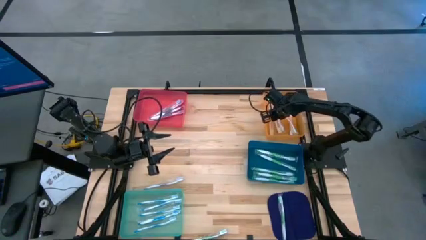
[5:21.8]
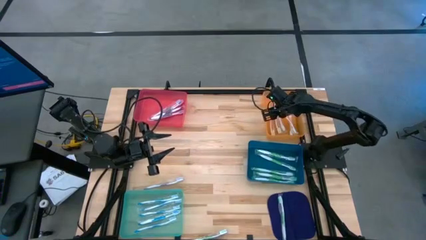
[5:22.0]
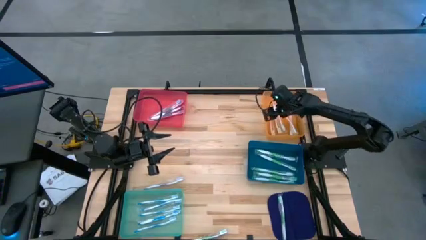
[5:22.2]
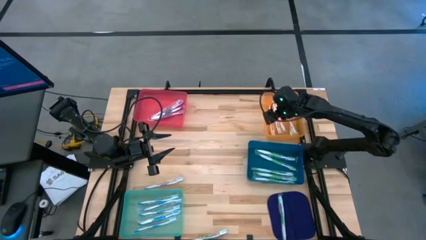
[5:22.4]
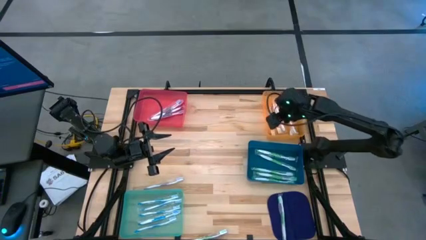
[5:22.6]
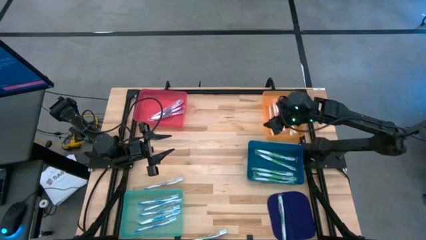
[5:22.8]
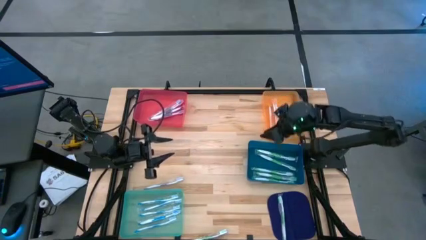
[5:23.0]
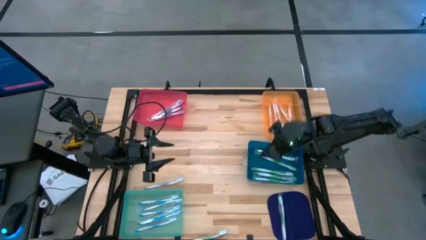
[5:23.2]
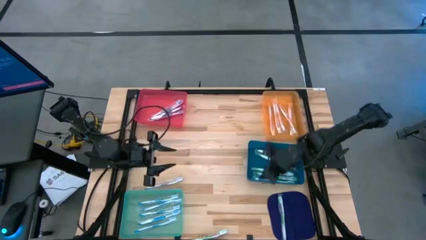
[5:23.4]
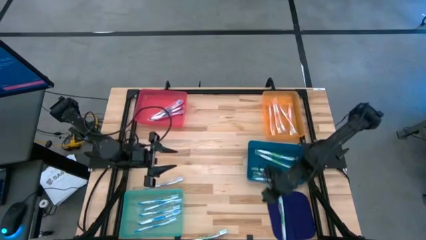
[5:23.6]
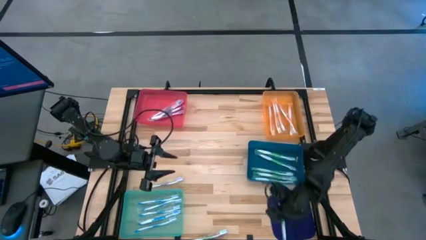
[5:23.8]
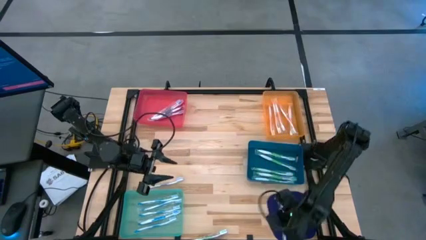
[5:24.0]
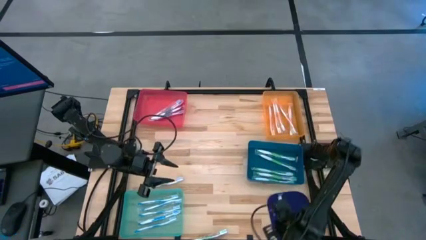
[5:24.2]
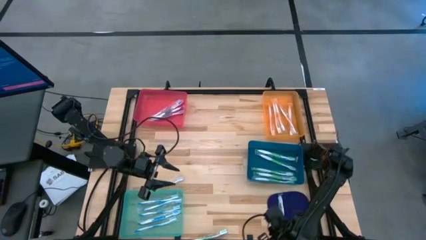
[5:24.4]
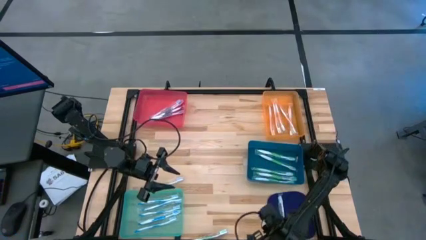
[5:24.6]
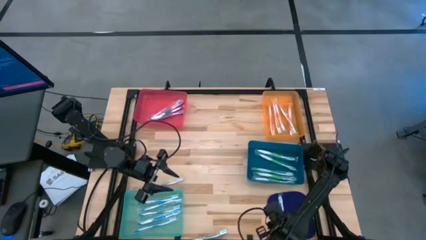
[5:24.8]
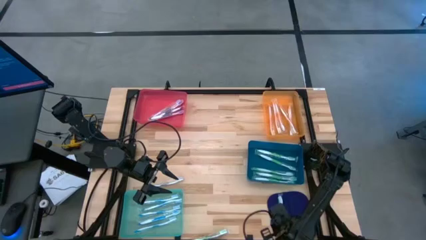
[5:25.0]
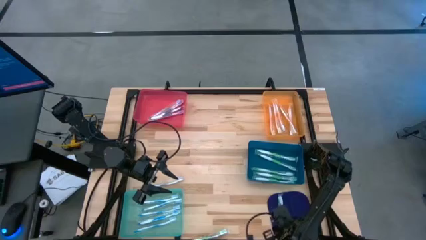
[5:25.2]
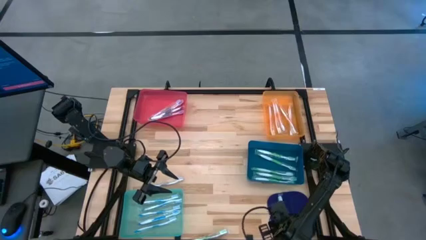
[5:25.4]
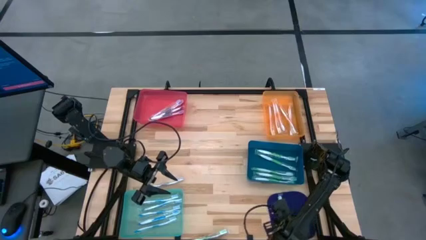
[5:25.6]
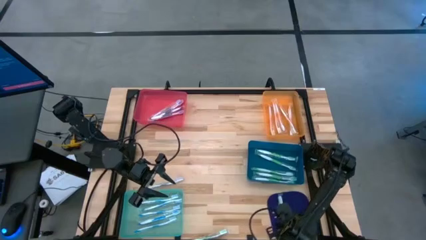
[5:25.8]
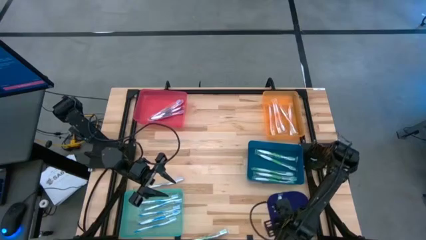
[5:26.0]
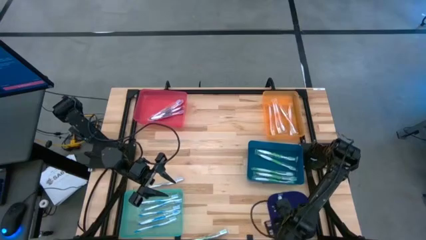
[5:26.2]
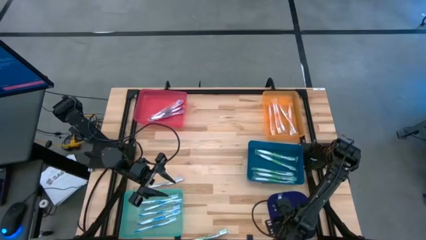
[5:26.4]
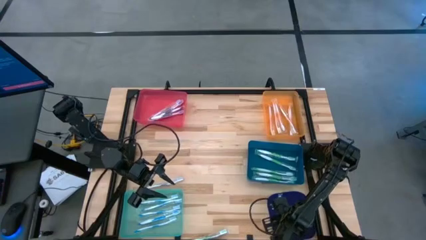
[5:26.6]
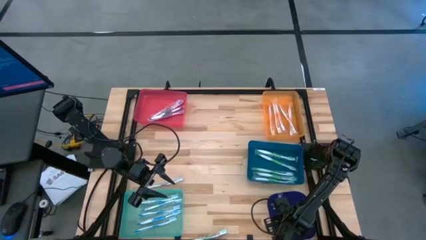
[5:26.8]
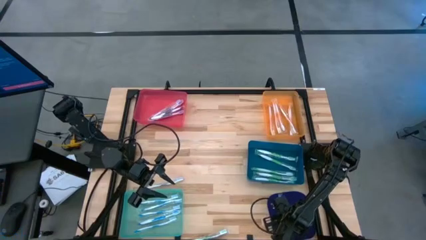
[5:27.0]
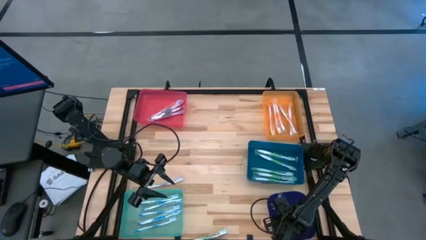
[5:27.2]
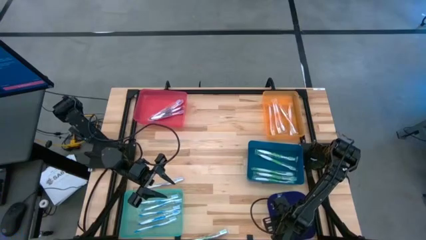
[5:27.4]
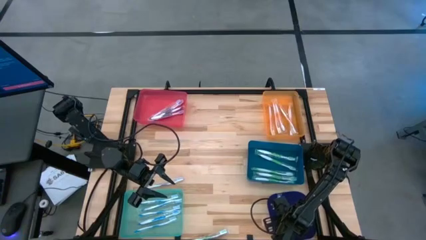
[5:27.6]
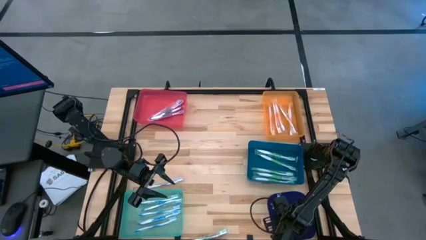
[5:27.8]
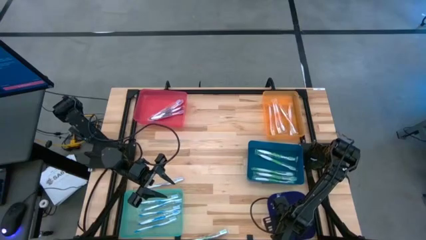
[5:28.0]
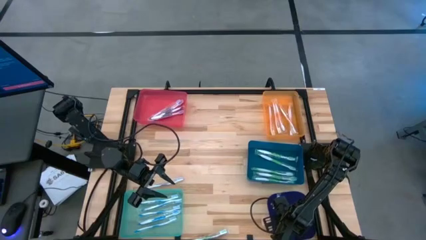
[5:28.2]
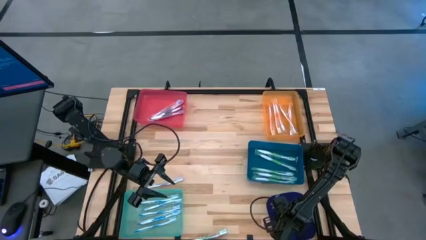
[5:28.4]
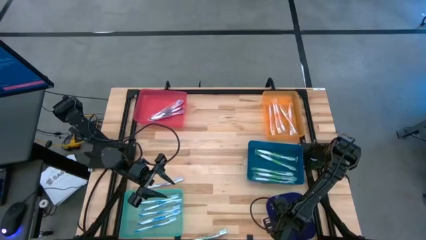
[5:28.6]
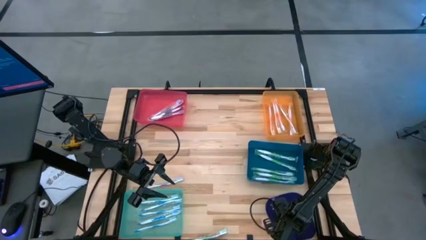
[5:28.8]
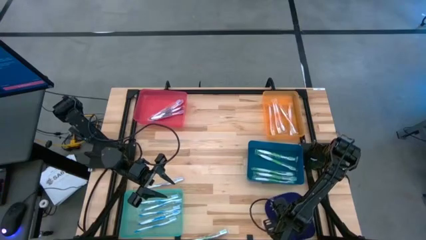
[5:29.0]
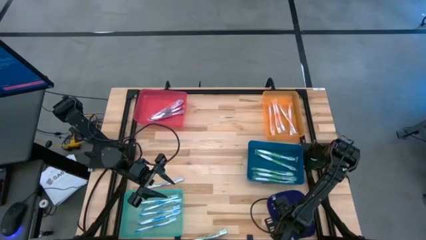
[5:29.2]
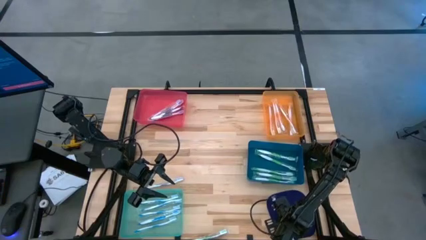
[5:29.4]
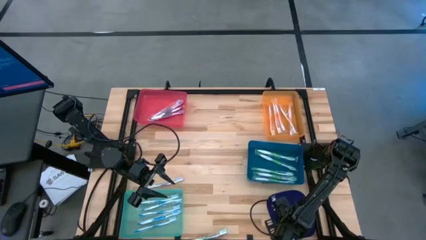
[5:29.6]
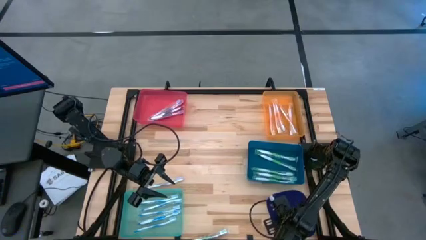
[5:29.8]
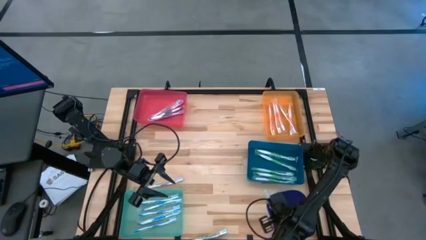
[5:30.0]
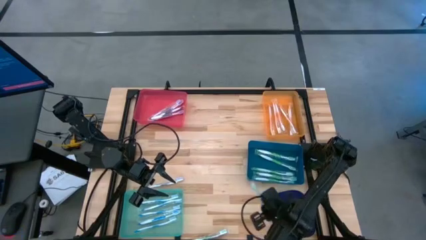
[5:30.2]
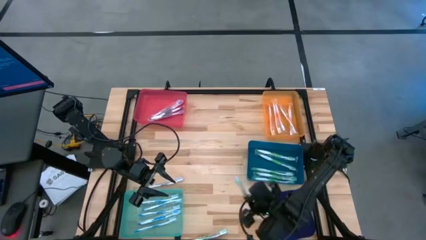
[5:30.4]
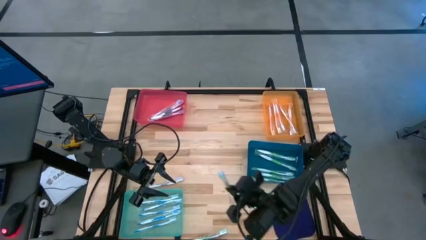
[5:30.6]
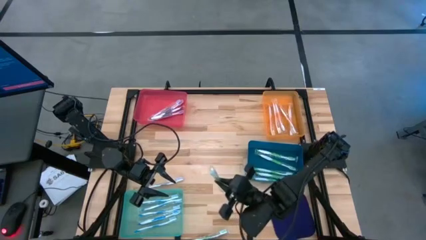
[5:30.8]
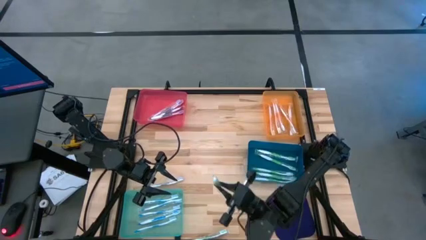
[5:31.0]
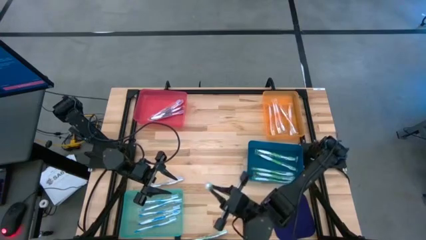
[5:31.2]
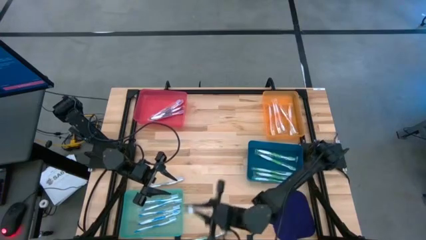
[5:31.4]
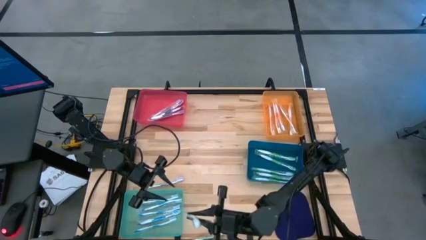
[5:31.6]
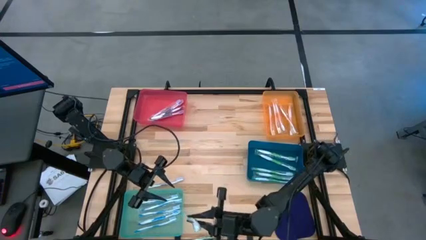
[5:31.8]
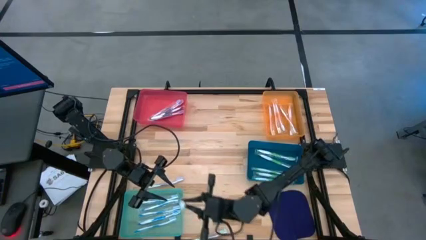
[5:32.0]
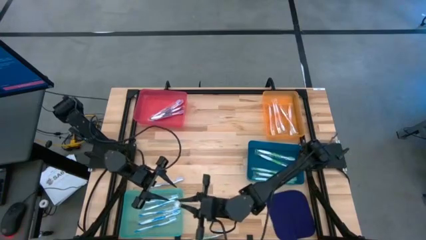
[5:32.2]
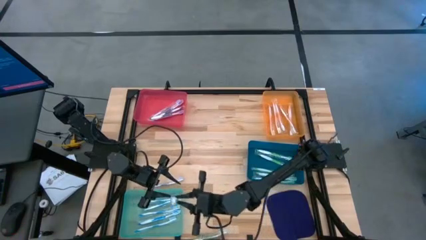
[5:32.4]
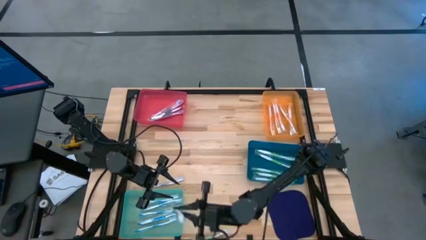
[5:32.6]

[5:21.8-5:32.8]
Task: Pick & Place Toothbrushes
Put the green toothbrush into the blue bin
